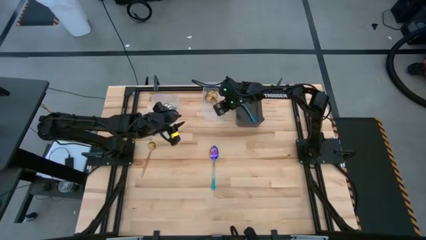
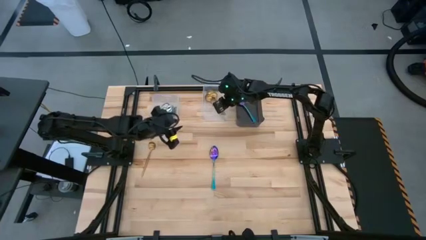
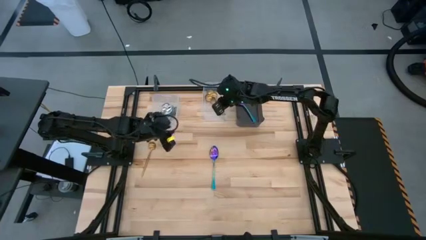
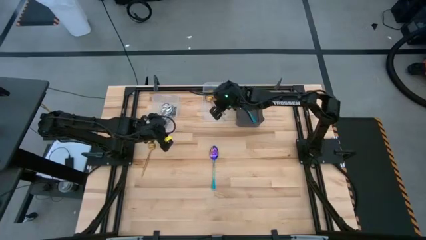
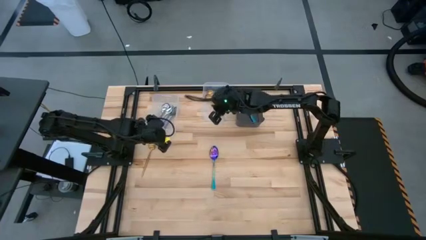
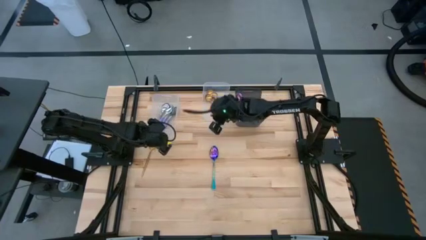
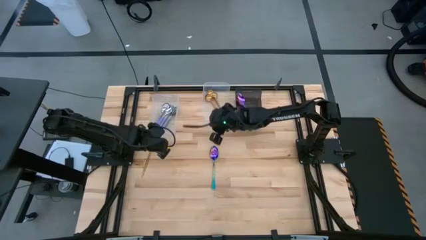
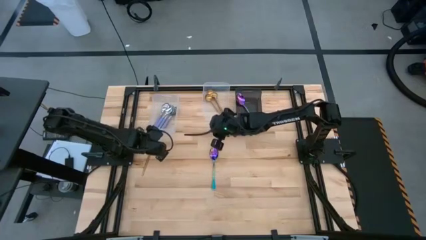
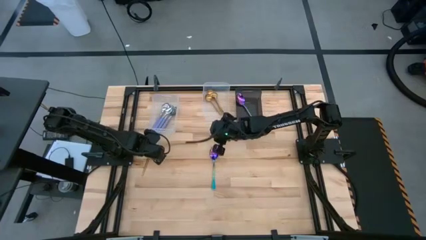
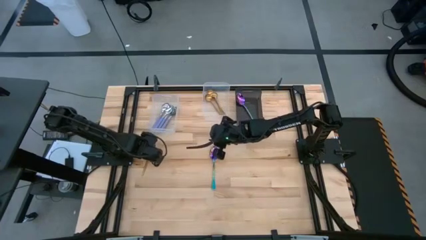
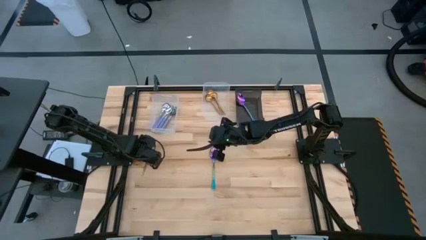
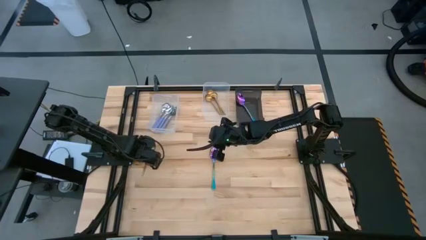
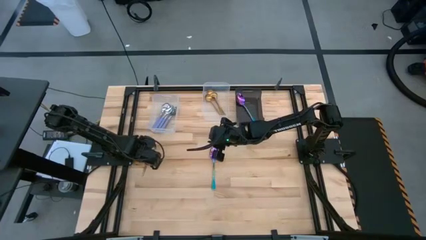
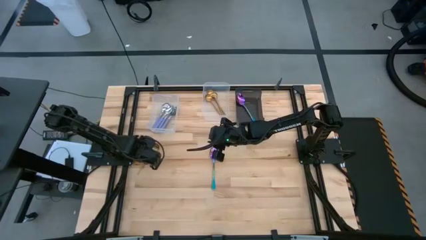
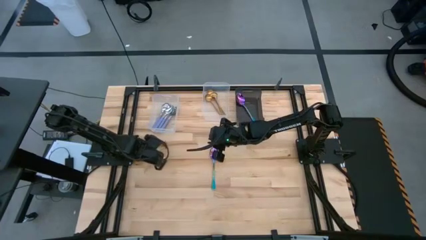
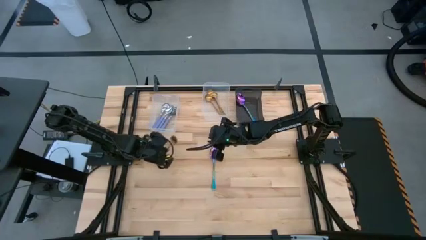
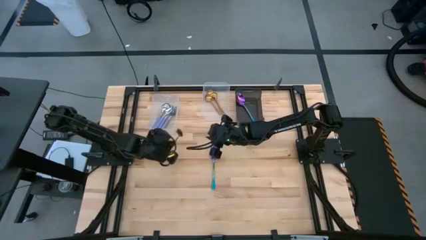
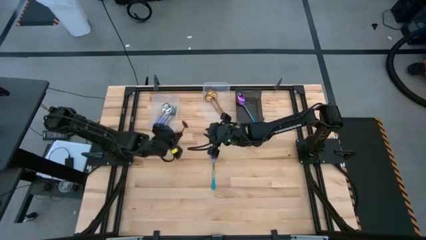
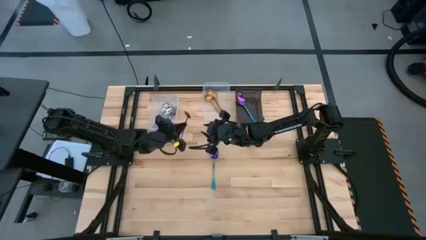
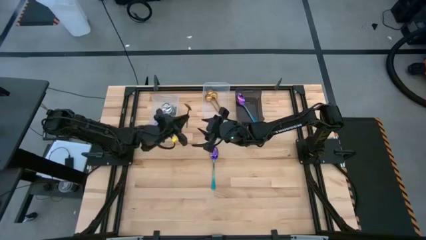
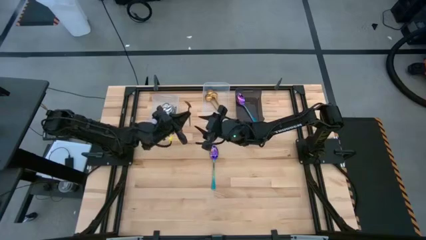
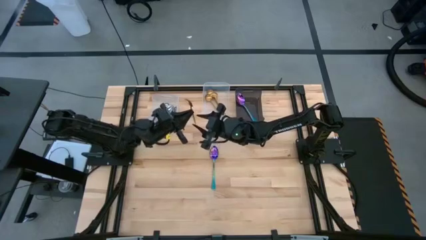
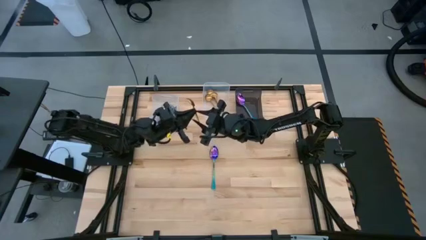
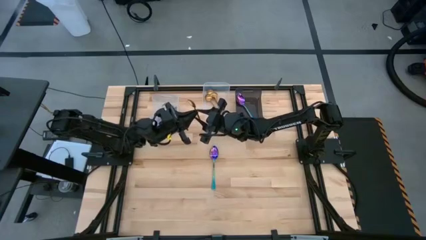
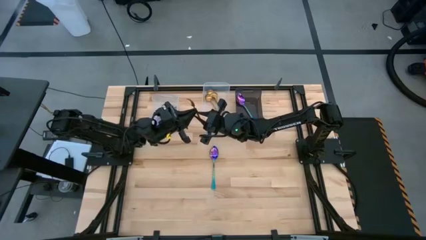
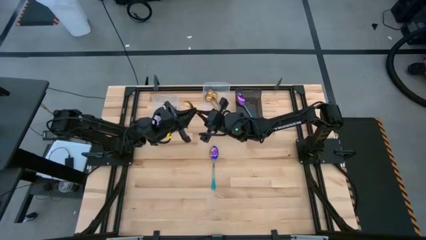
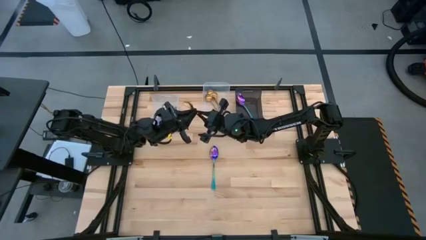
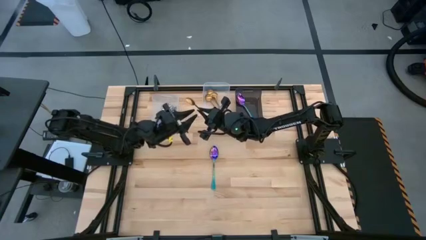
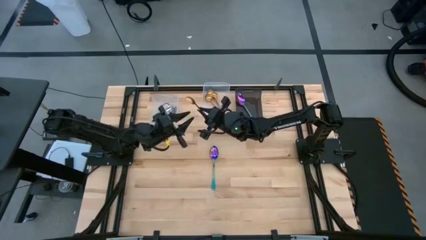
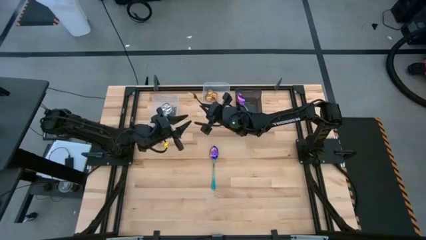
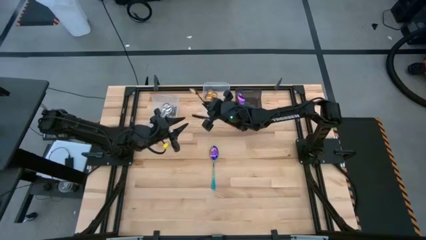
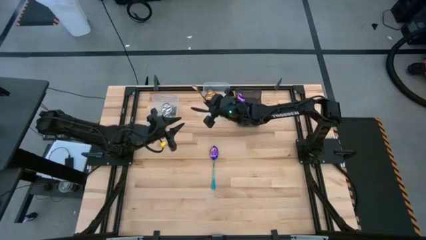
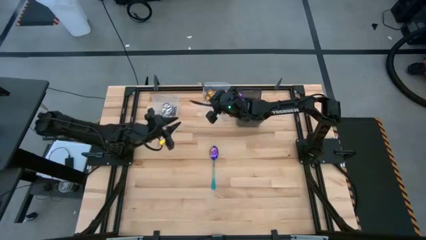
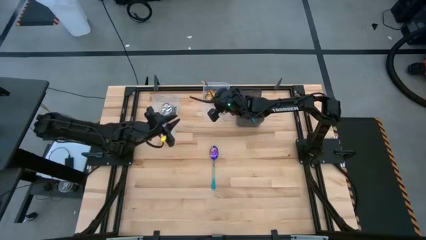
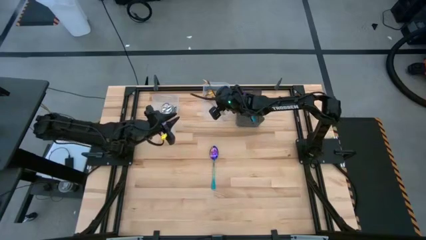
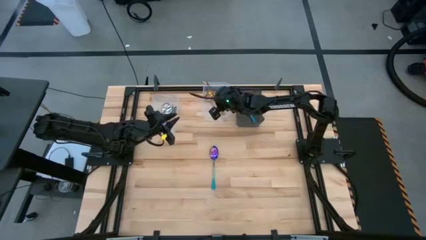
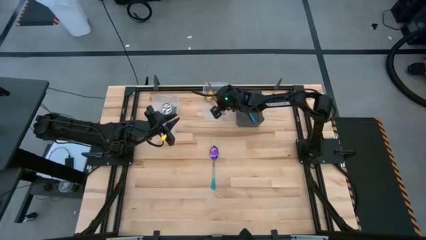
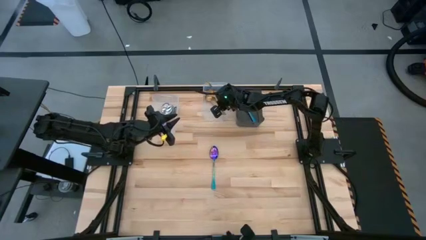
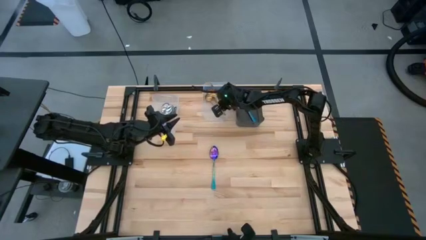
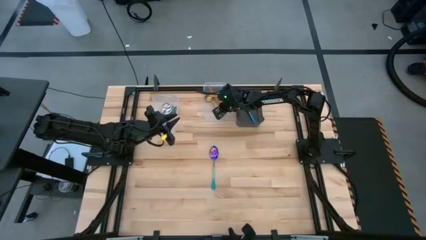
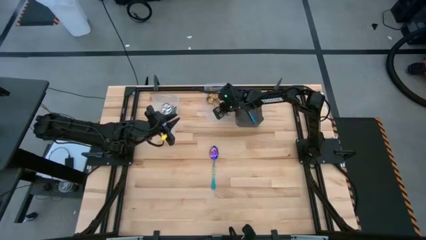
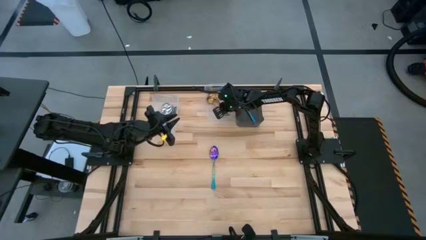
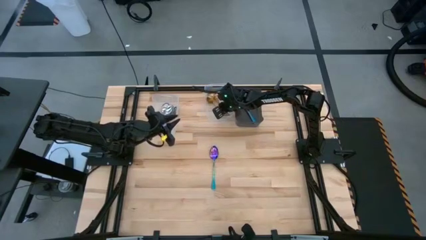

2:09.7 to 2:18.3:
Task: Sort silverware by color (type)
Put the gold spoon into the right transparent bin

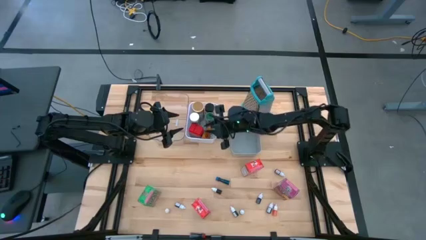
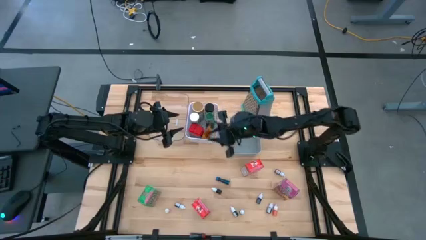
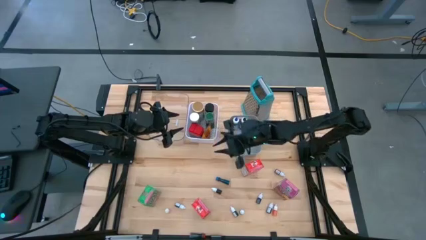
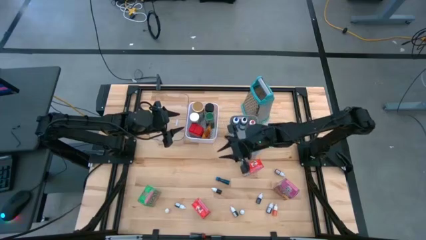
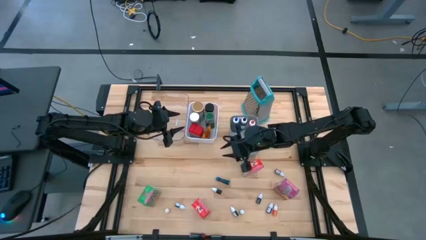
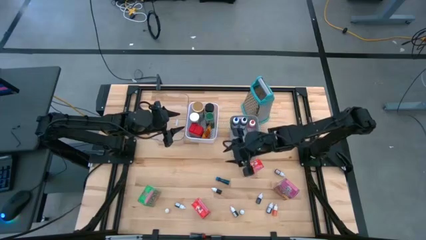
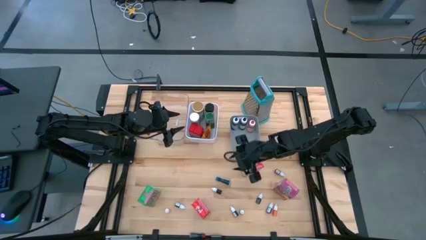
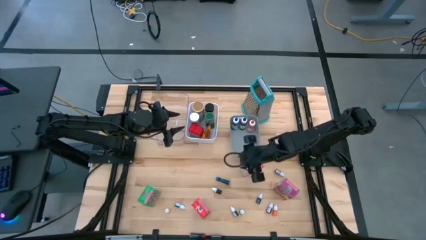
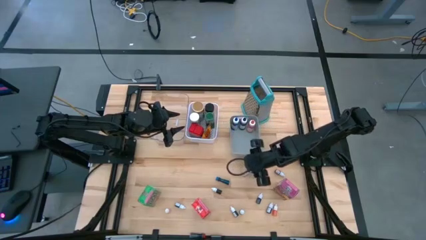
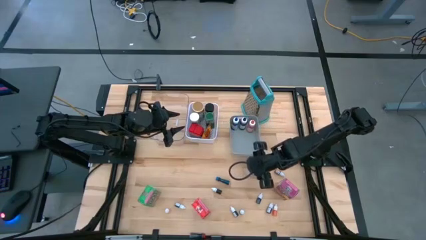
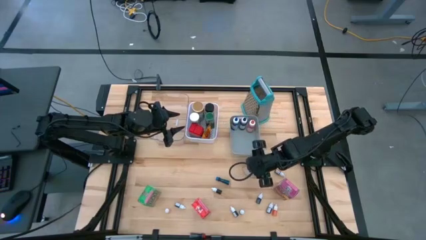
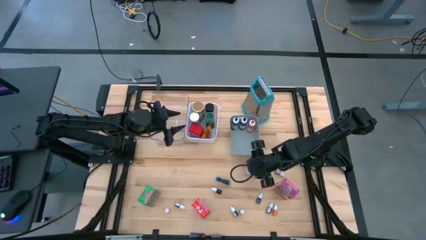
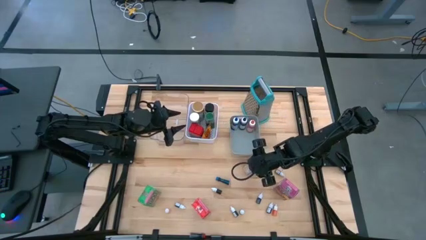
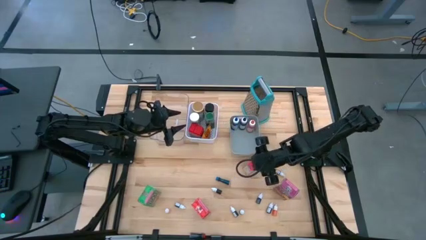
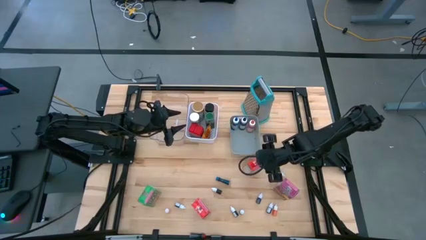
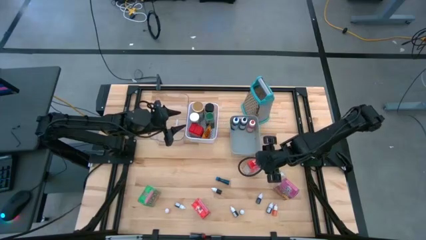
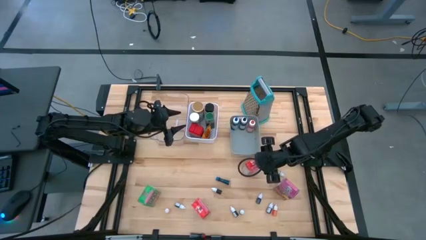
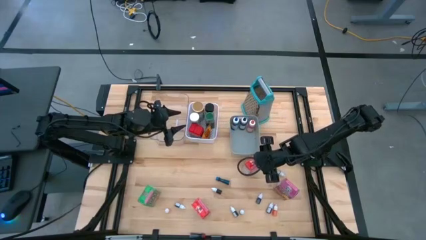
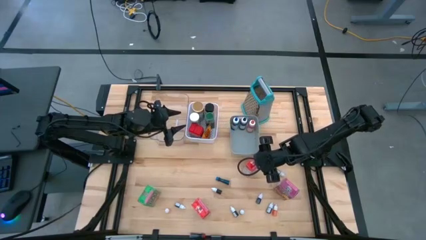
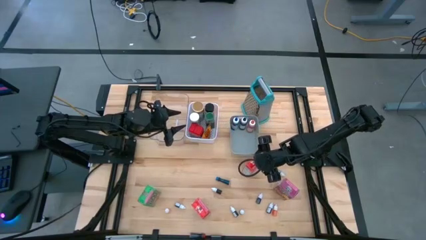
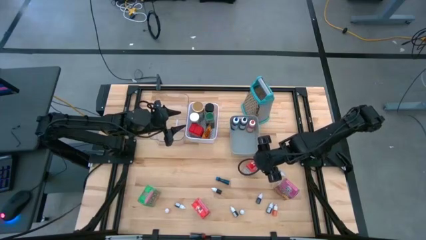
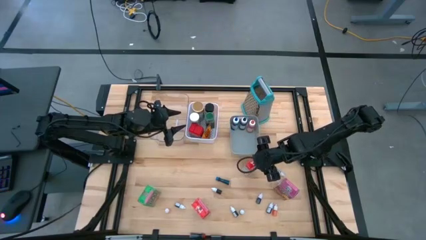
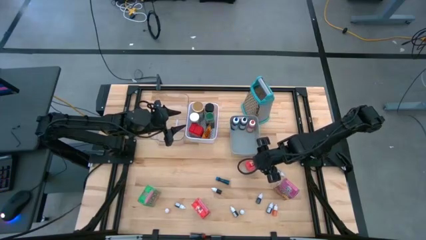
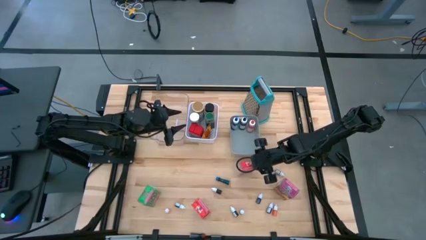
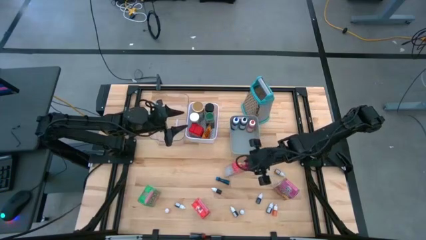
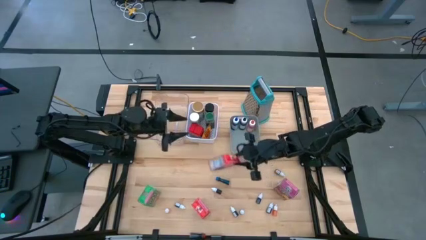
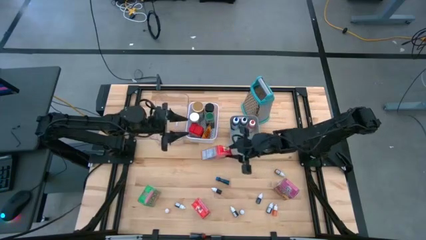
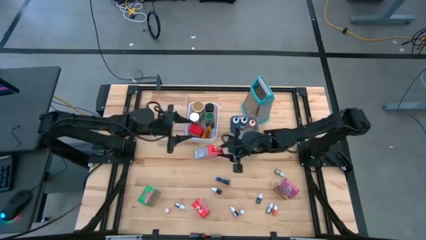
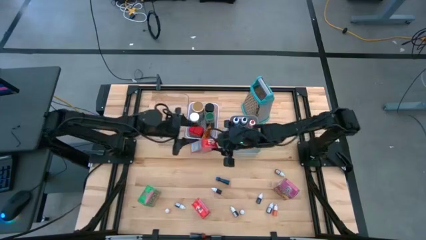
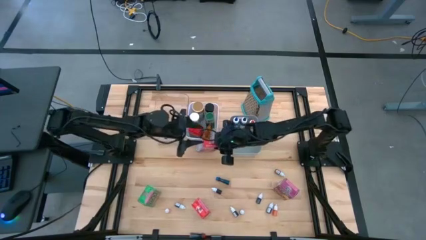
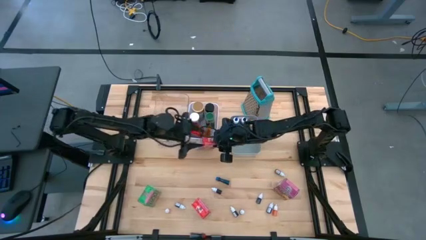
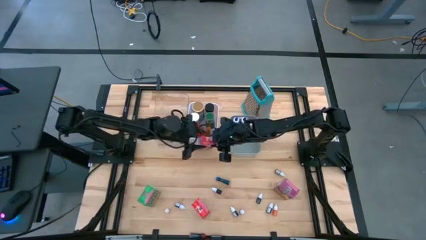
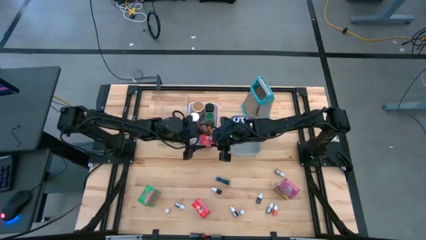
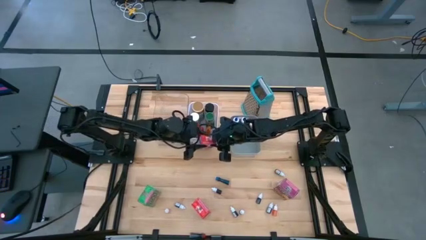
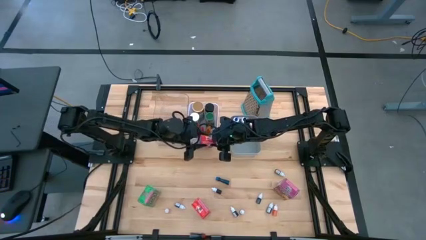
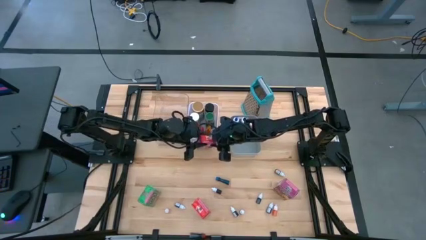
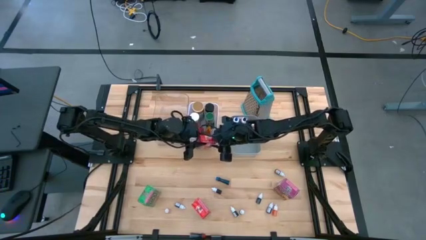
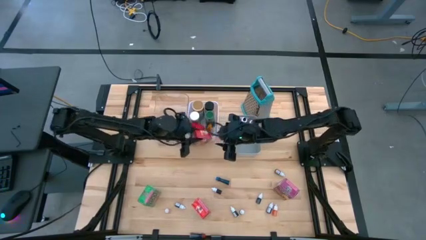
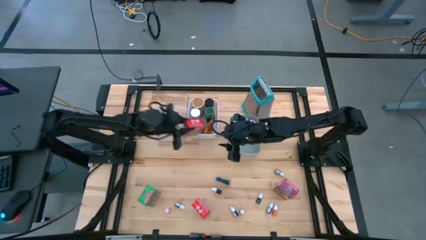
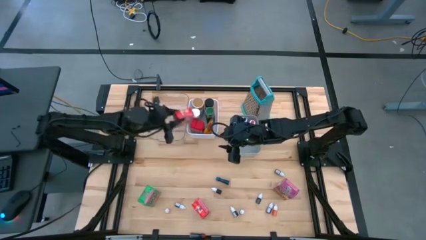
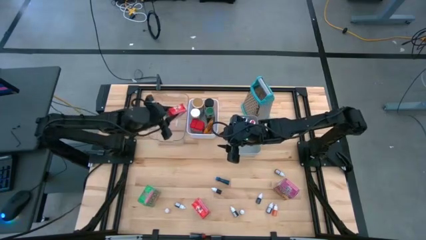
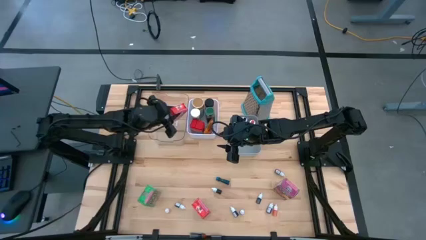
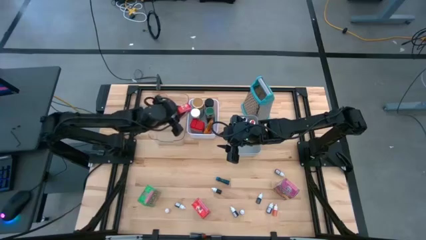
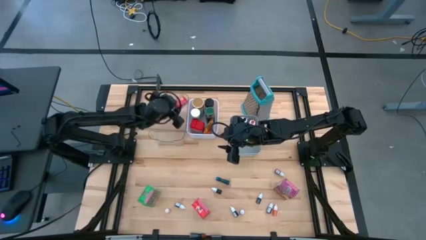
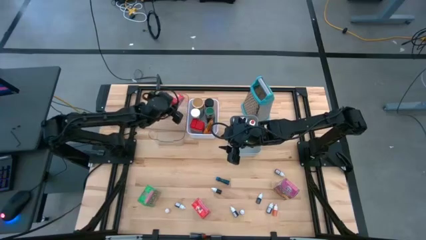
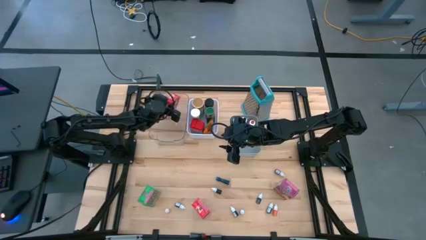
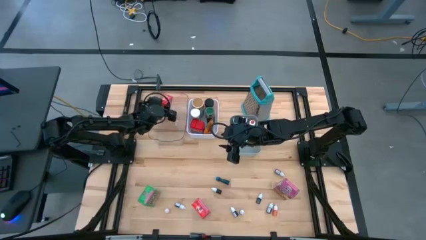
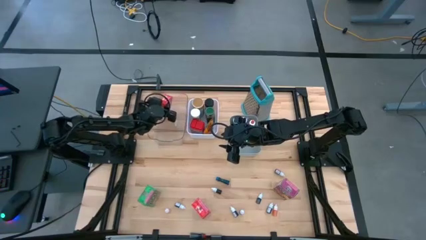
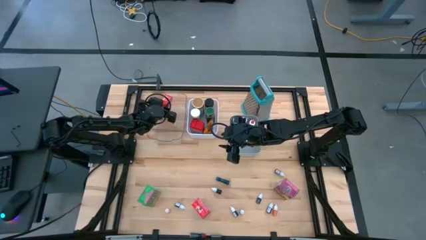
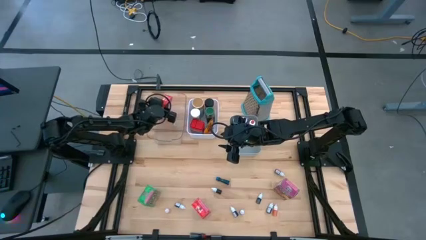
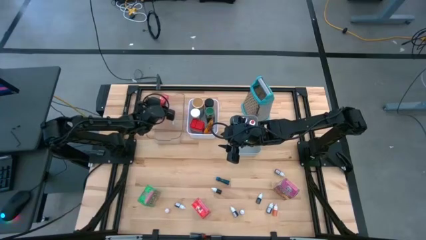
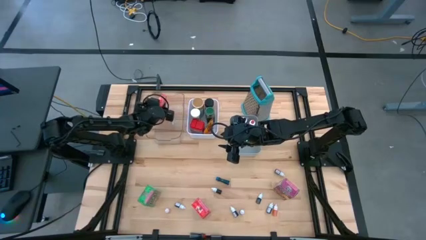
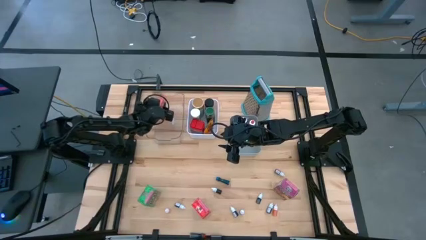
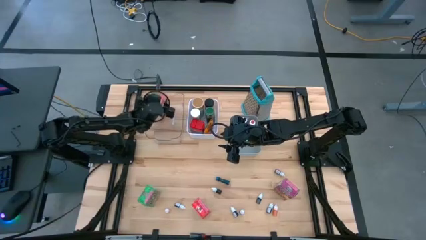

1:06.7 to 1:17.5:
Task: Pick & Place Kitchen Items
Put the red cereal box into the transparent bin
